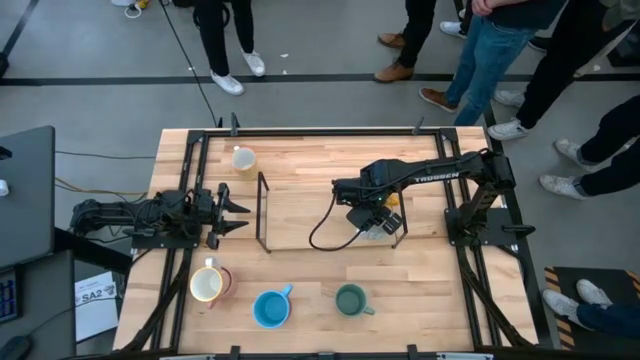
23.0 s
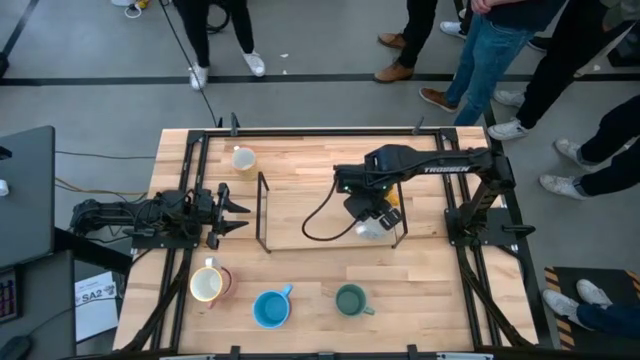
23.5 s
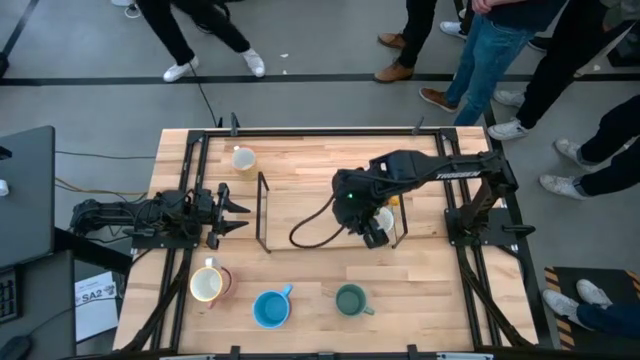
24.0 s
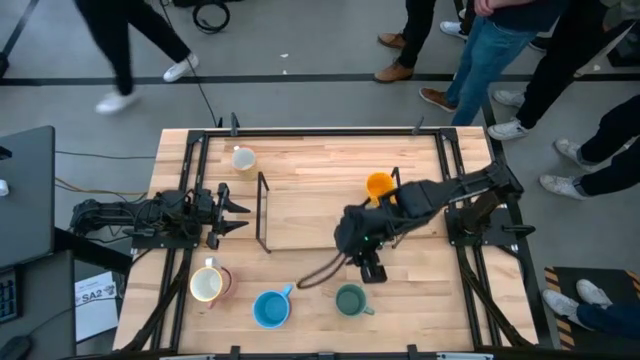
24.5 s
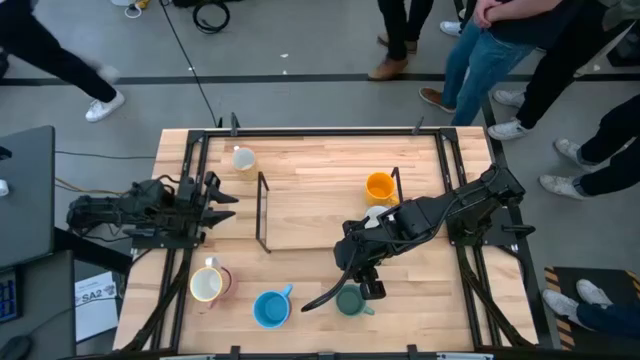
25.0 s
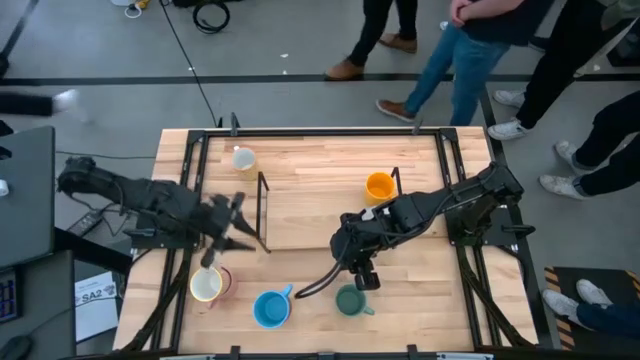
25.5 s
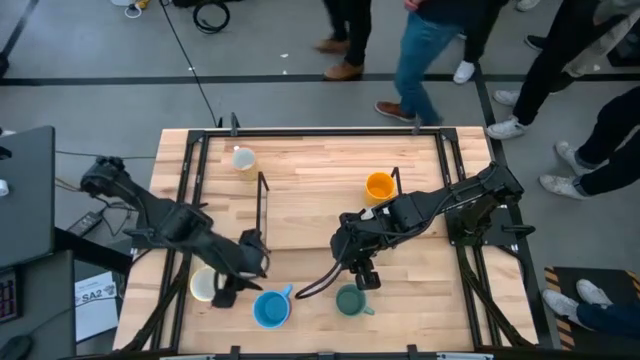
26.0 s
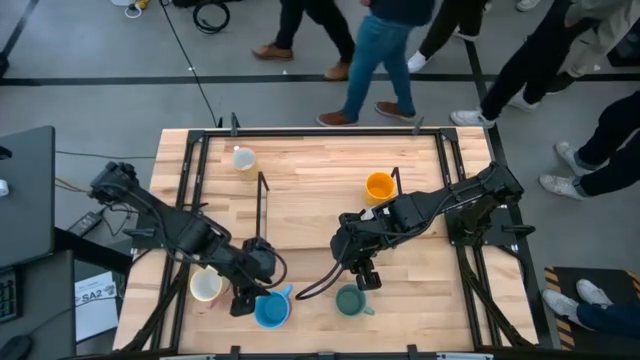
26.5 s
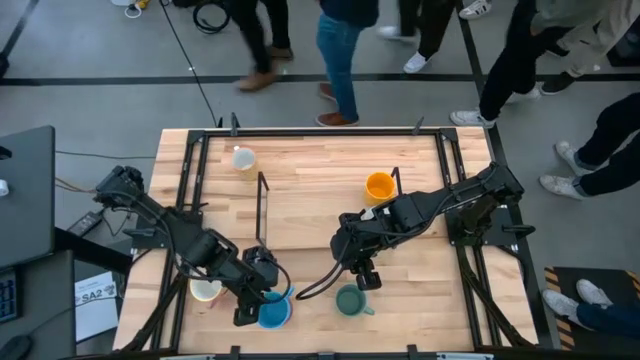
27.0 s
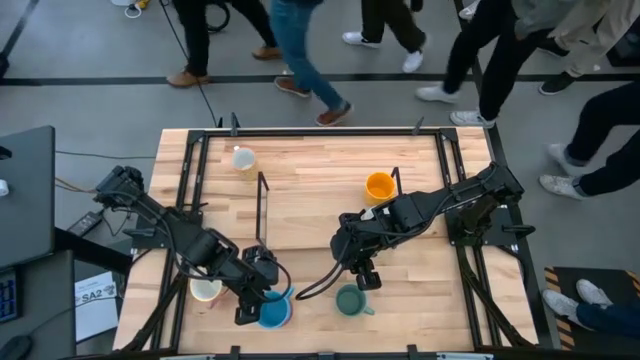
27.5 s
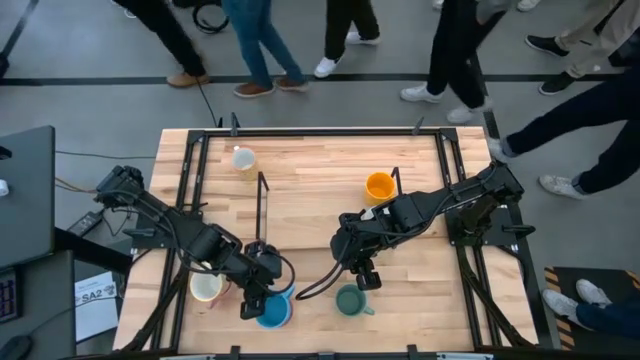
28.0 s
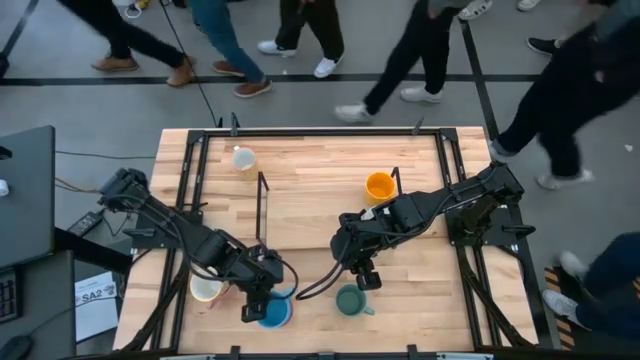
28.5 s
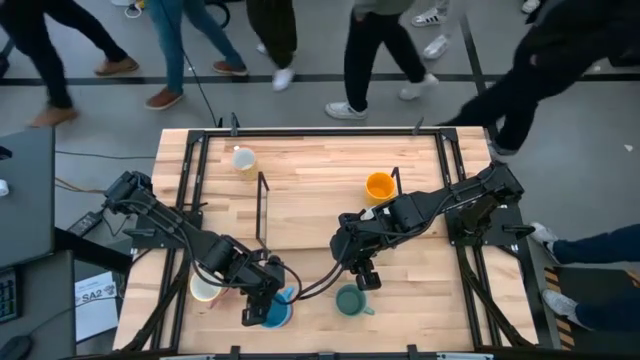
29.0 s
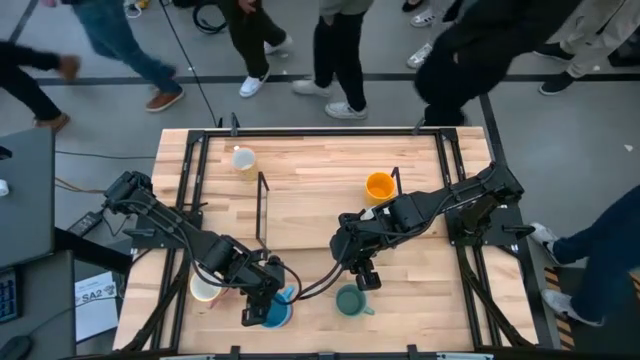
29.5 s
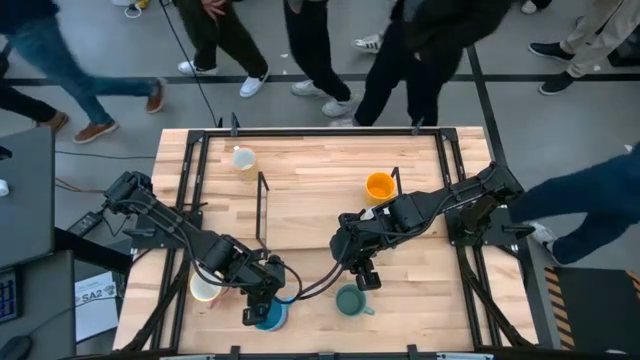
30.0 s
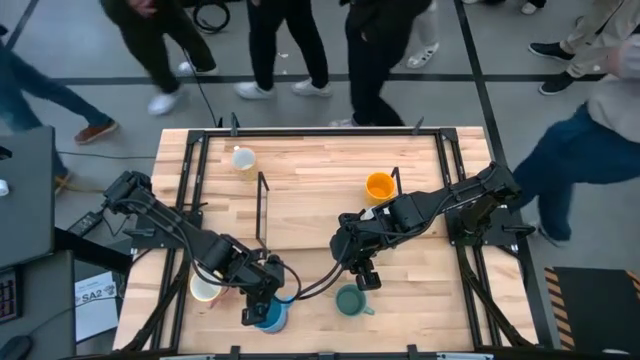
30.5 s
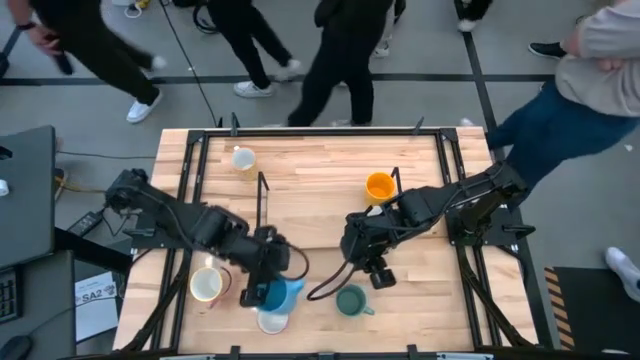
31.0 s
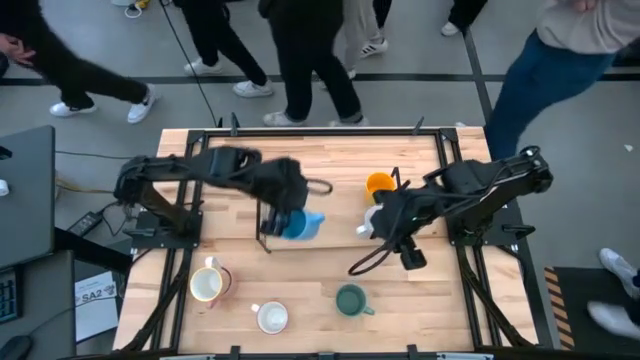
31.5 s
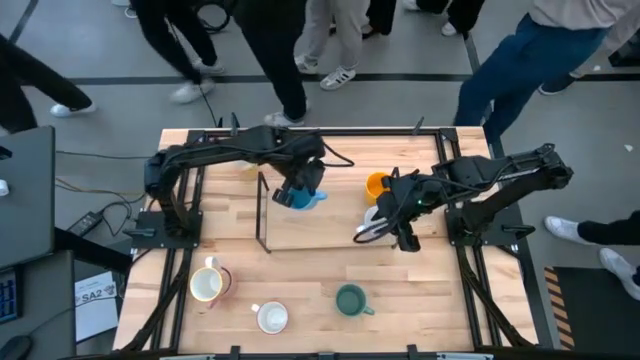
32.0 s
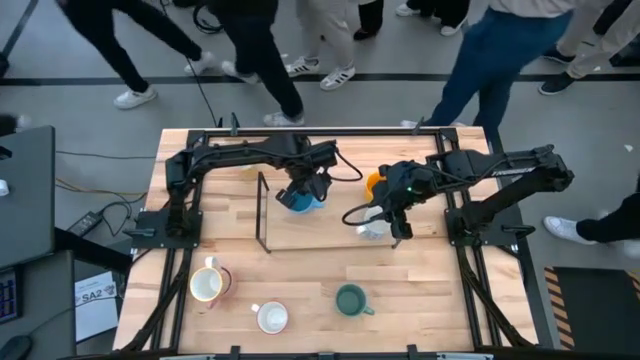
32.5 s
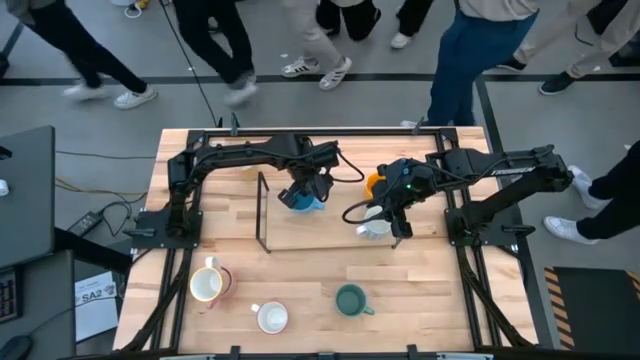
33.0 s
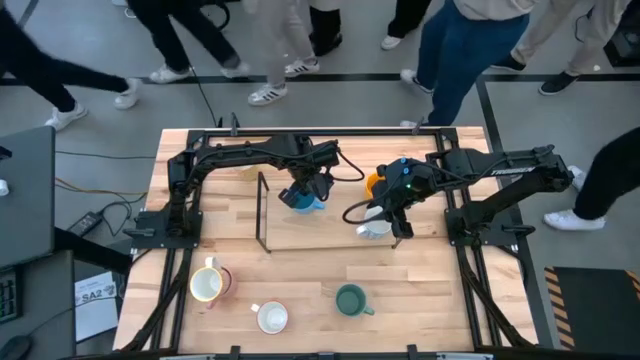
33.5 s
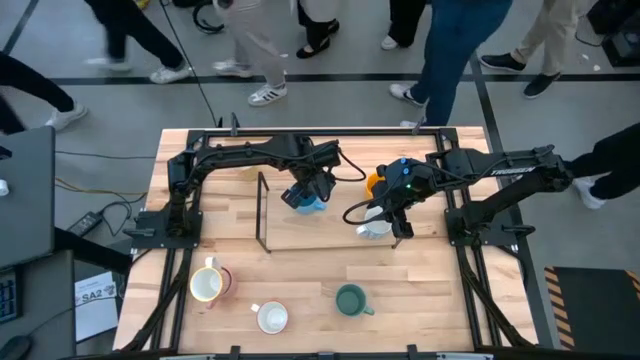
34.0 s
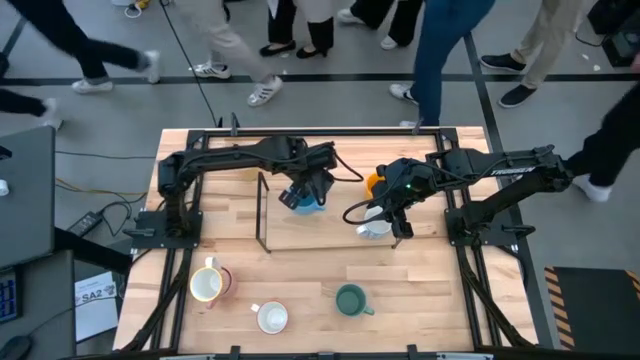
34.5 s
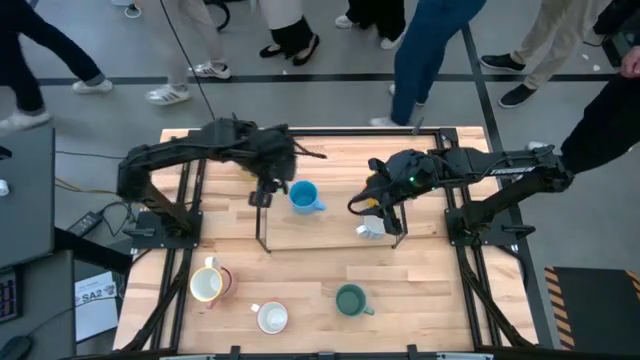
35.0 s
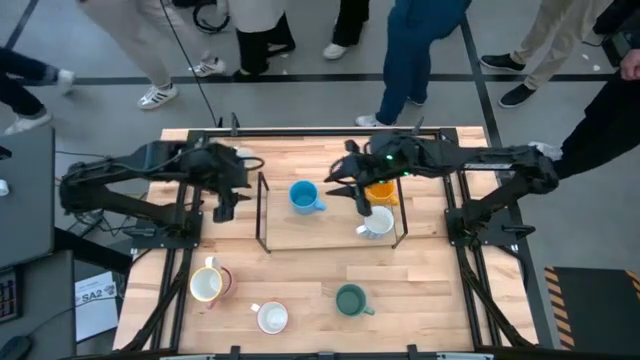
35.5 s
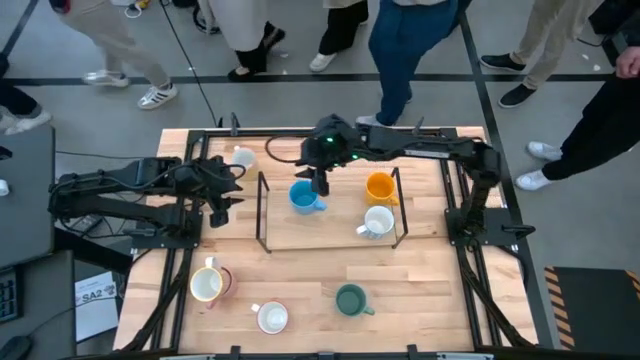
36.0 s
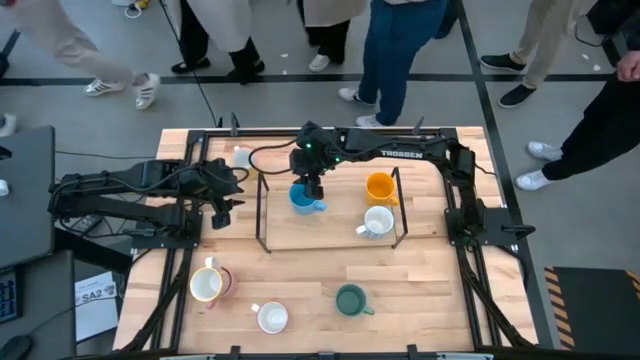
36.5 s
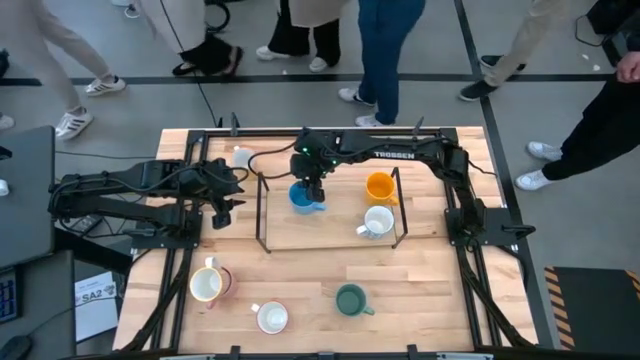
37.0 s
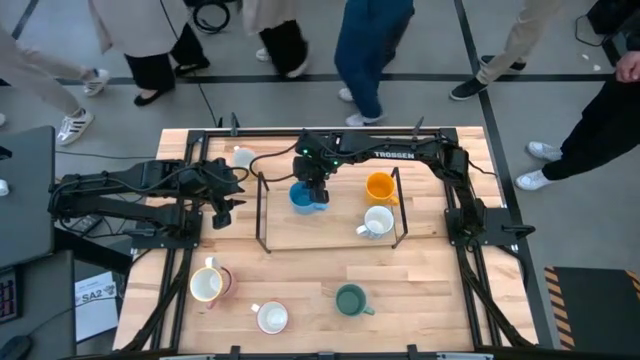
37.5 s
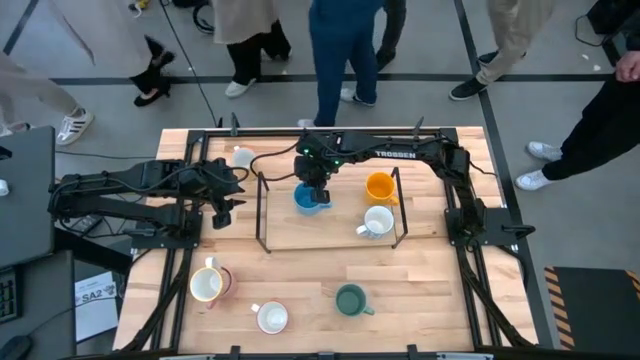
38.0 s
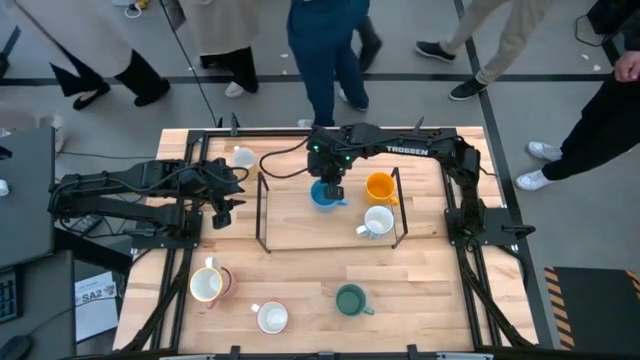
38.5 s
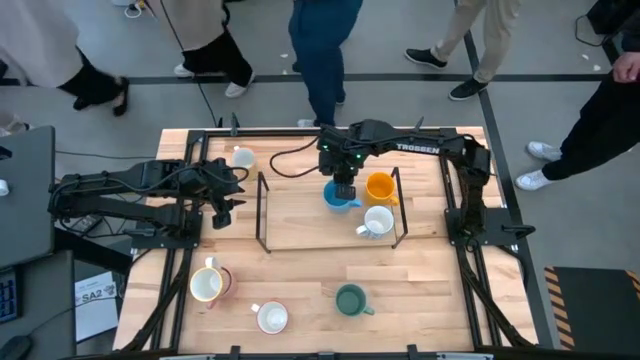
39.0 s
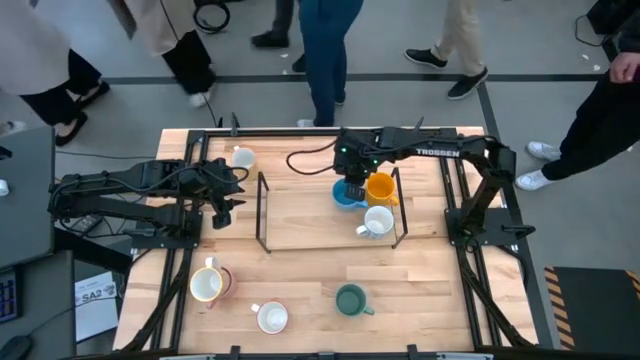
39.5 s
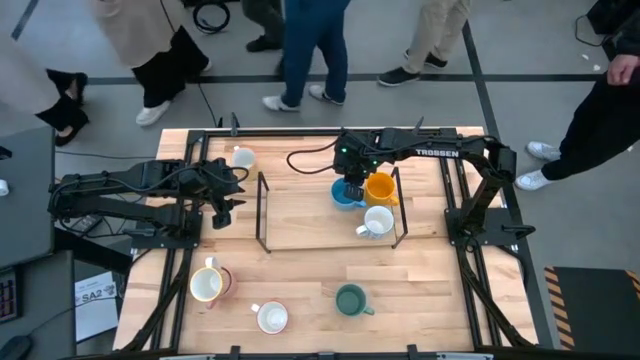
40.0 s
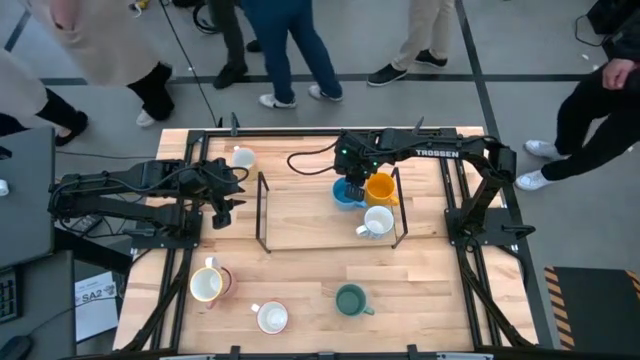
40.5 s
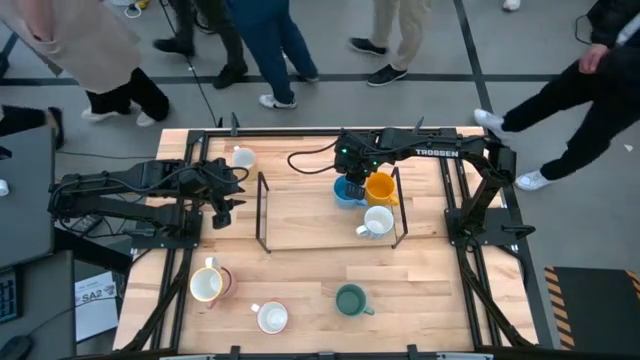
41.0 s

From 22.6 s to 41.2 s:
Task: Place coffee mugs
Put the light blue mug on the shelf
